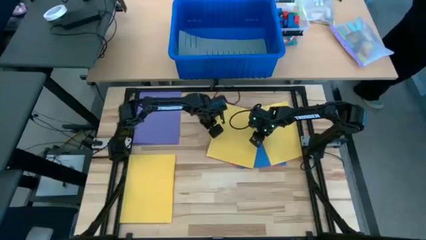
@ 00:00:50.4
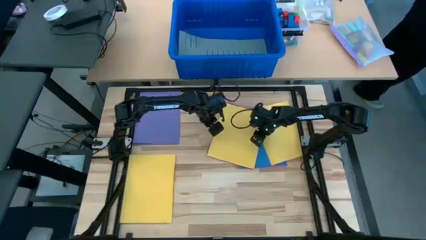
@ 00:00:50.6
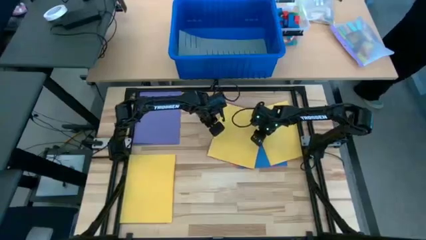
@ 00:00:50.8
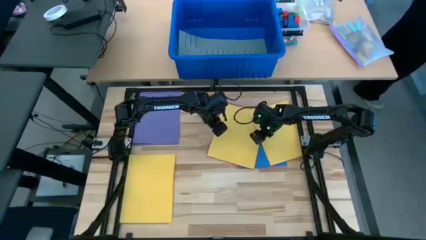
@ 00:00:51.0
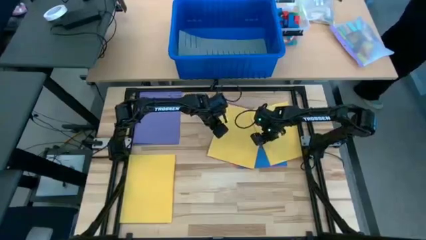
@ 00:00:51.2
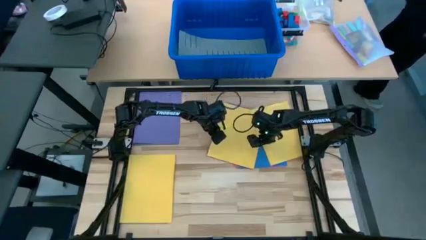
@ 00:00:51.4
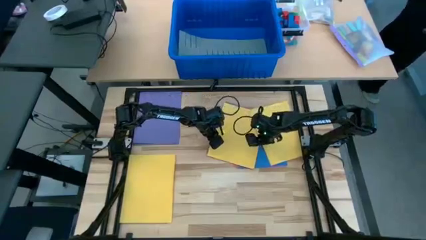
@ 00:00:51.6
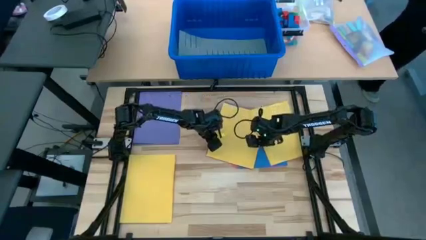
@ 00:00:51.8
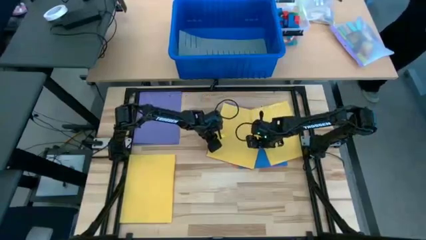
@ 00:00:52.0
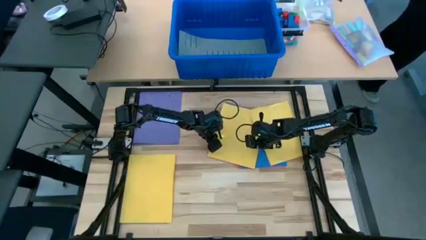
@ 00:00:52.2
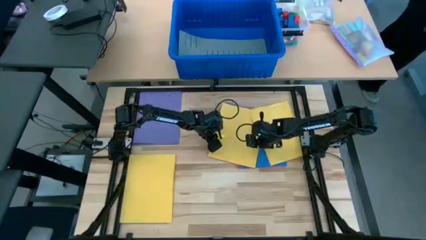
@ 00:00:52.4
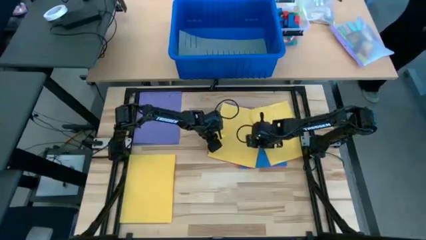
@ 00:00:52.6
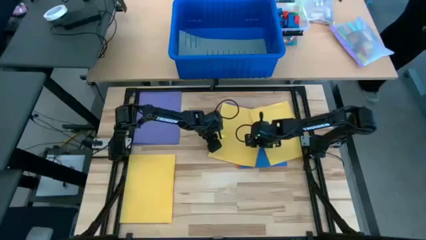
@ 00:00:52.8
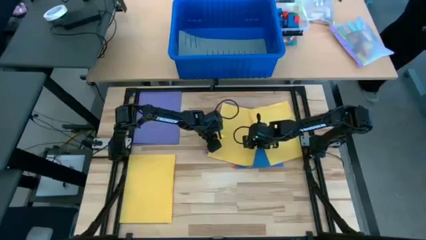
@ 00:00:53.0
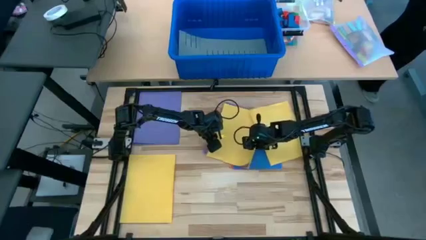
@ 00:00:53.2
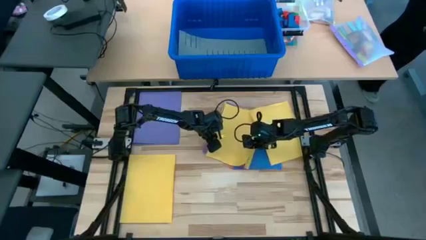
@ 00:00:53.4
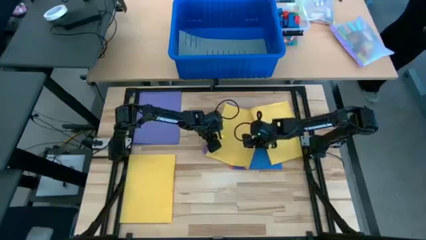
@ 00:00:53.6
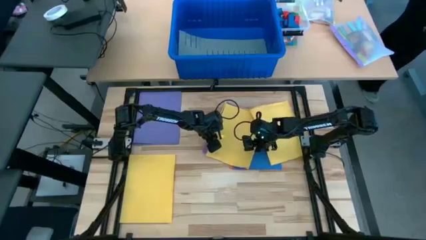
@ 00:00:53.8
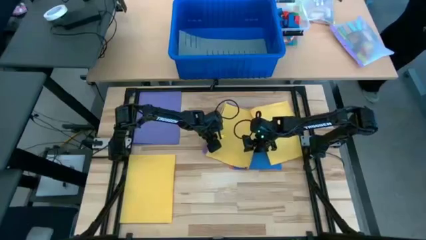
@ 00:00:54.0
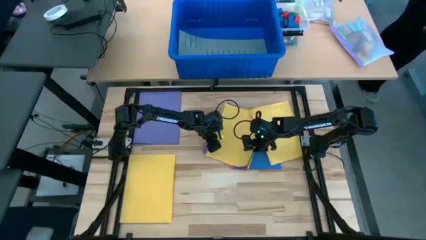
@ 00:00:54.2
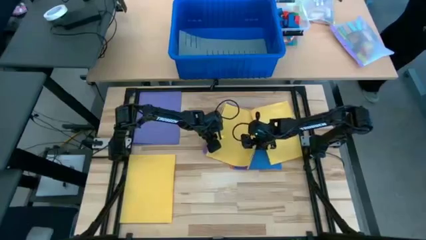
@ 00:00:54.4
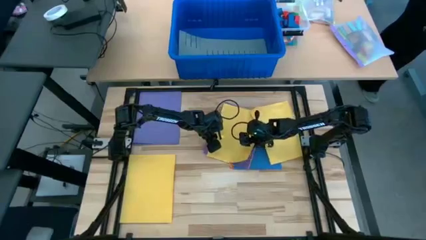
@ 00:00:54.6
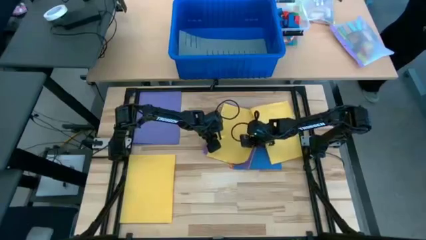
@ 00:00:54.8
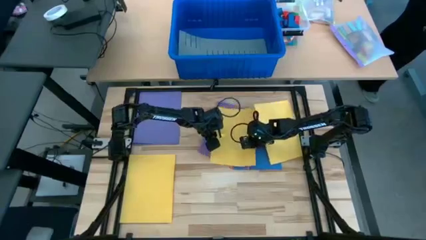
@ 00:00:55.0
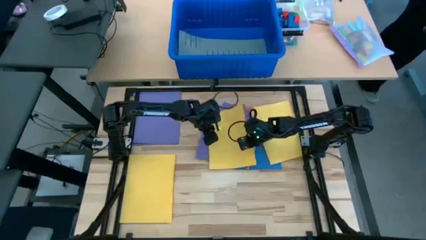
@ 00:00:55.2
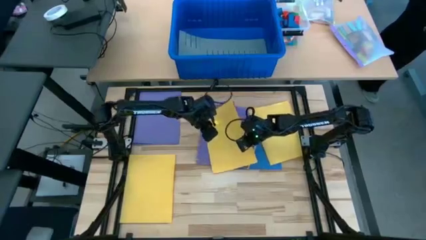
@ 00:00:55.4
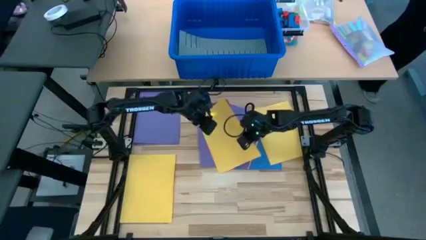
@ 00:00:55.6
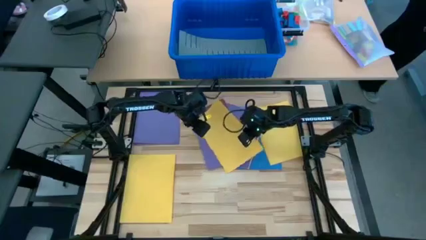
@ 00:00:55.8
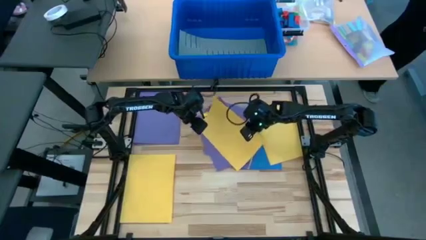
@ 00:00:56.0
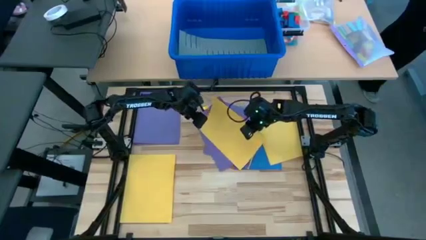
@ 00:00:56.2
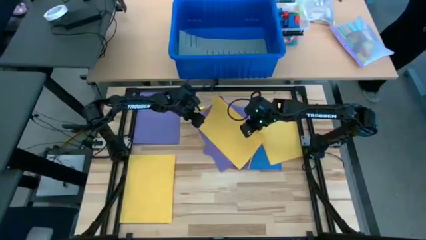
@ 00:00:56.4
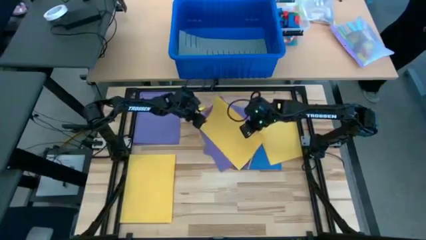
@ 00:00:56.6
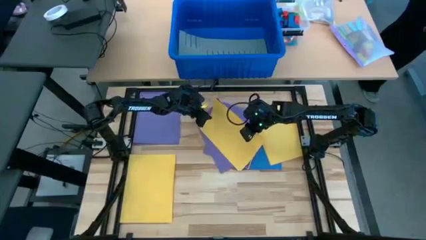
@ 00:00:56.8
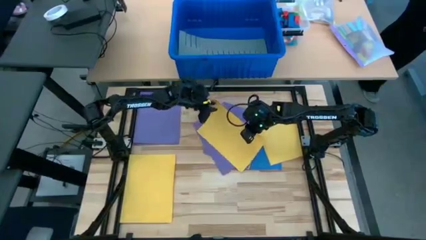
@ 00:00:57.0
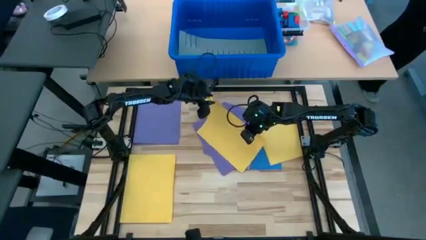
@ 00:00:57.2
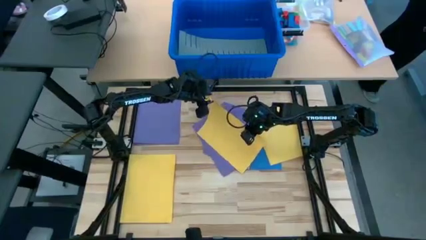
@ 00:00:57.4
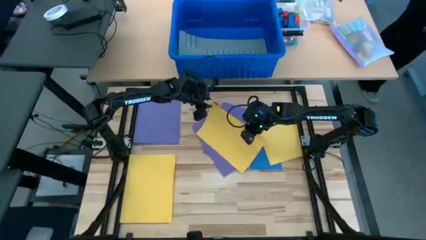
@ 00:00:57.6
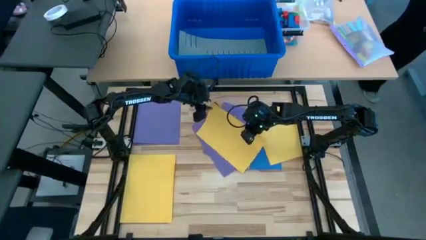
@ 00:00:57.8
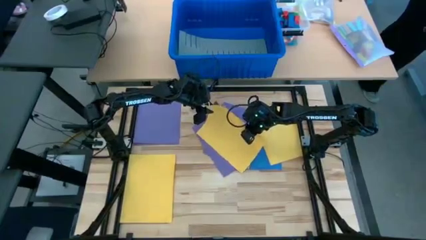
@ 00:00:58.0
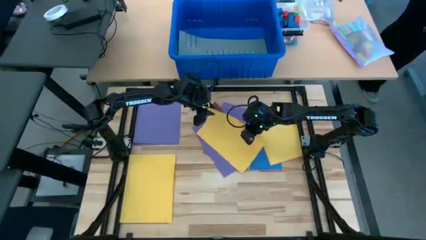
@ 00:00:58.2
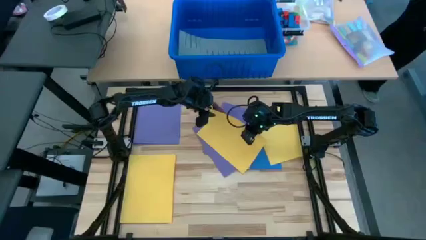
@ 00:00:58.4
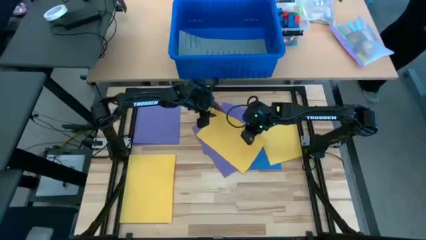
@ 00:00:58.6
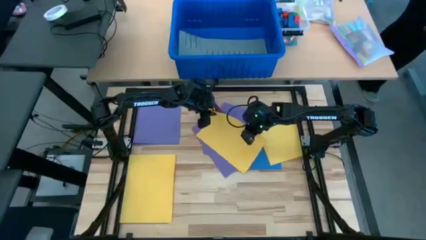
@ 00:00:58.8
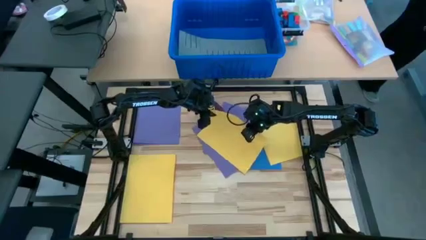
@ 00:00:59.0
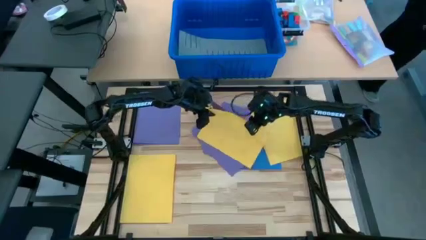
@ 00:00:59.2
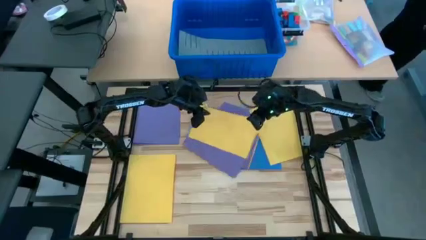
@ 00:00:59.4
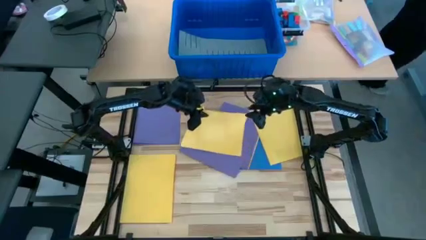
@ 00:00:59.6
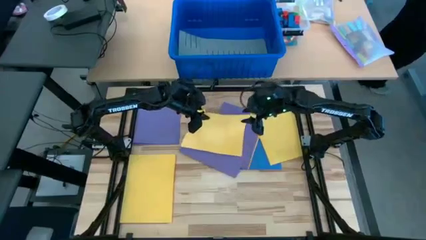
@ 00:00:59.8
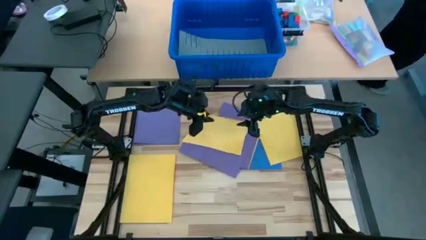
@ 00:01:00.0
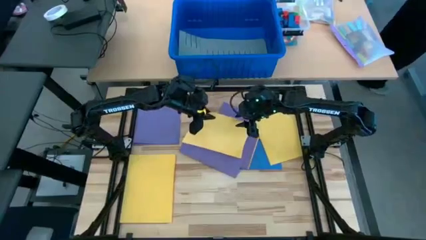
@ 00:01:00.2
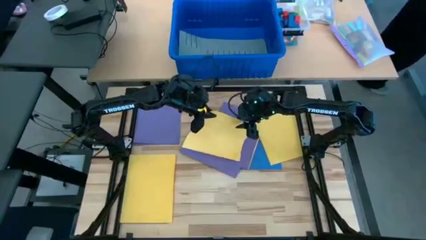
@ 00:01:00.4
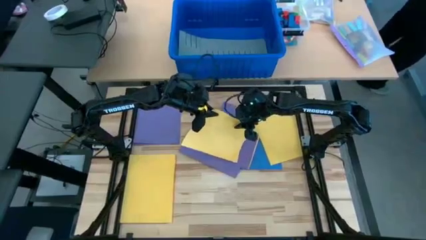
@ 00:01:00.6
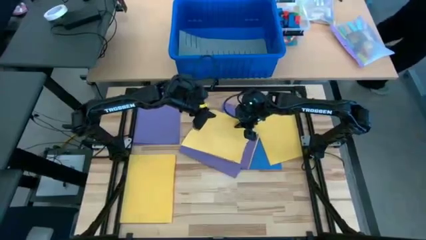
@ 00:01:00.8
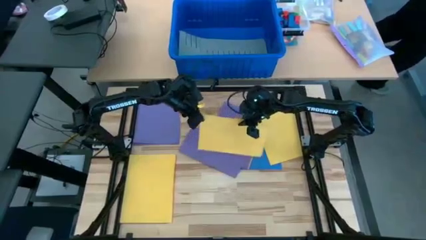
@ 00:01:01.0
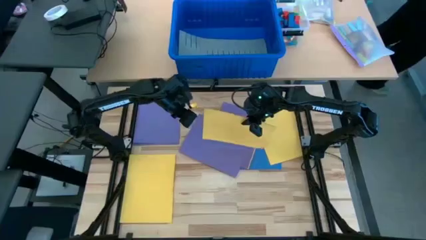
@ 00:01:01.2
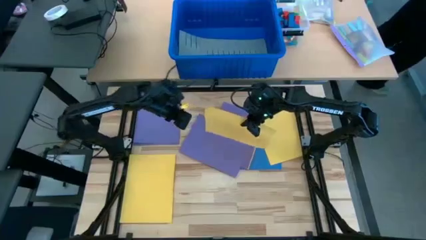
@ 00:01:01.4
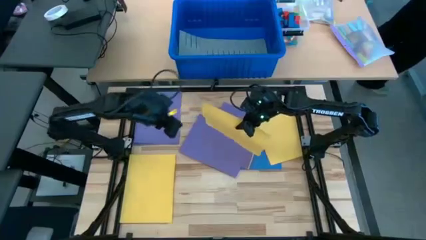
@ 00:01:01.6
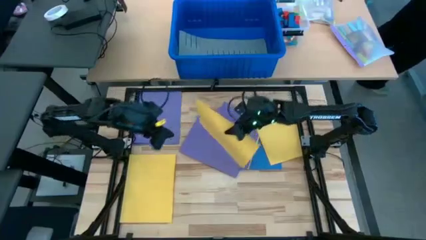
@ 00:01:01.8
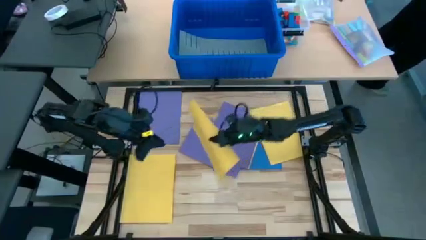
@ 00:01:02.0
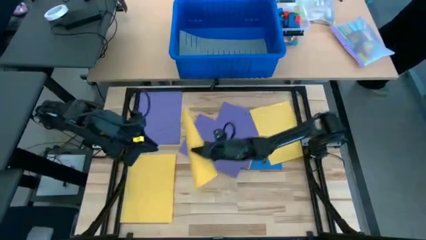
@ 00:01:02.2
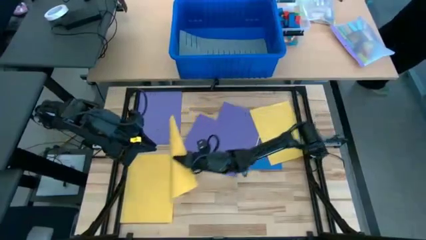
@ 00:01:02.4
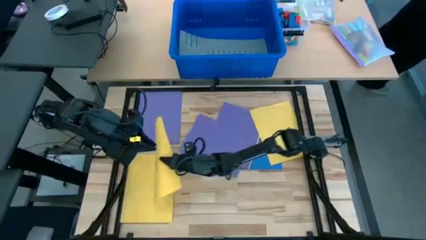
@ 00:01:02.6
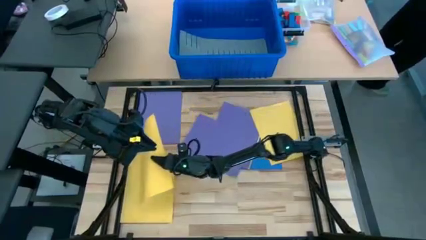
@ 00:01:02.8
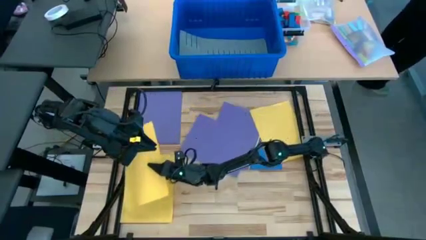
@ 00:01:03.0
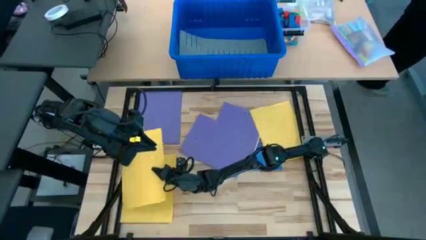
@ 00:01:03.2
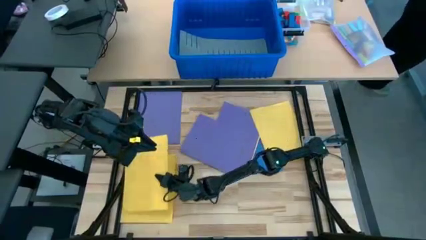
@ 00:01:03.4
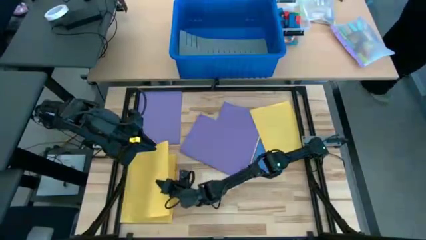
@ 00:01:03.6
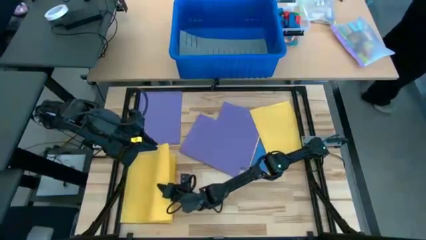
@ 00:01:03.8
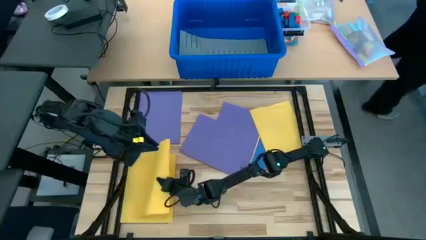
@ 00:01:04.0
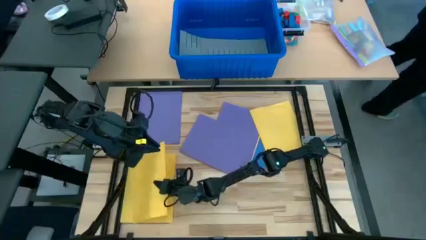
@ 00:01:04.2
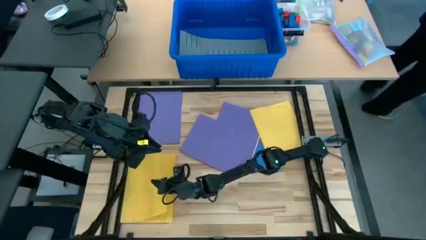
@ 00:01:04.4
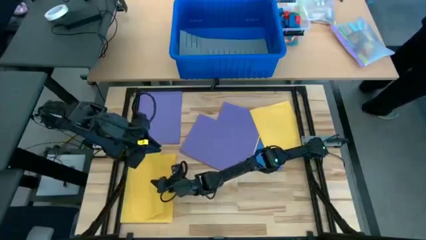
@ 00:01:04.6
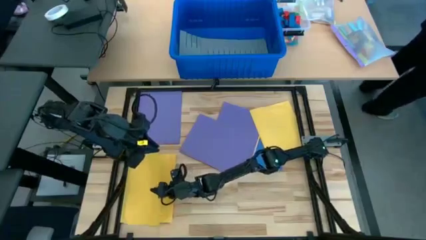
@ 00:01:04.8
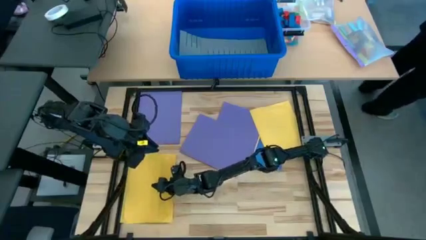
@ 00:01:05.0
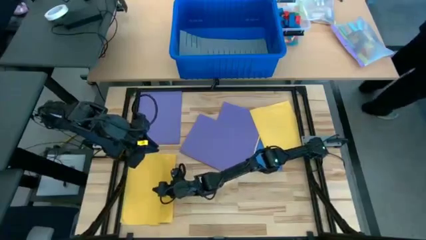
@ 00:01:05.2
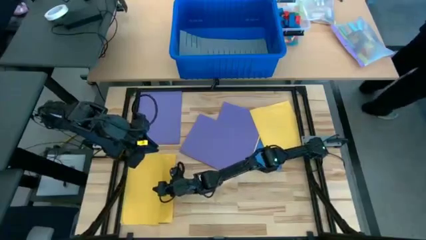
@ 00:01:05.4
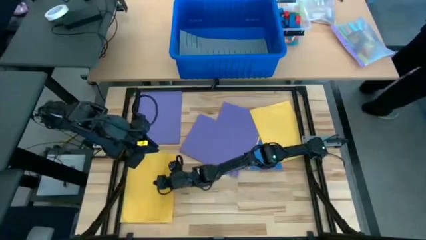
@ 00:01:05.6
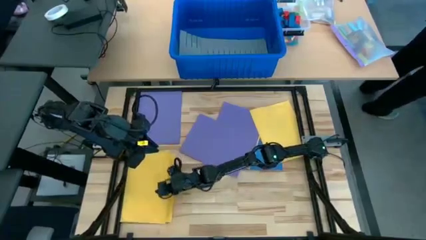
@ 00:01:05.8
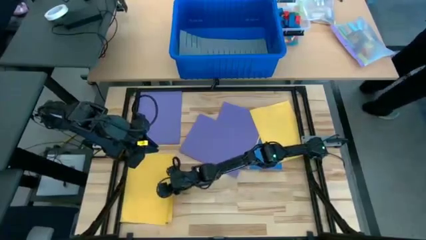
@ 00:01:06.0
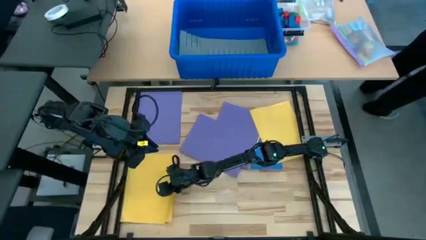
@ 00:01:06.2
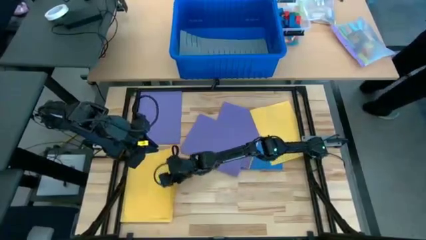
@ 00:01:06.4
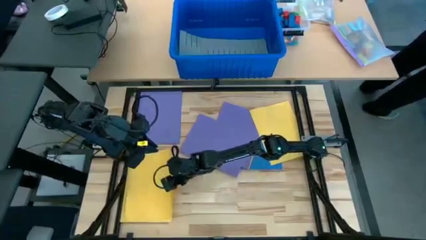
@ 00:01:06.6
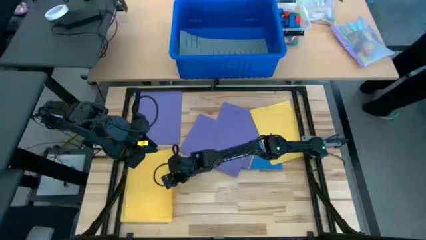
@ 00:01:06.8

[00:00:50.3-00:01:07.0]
Task: Organize paper
Stack the yellow colored paper on top of the other yellow colored paper
